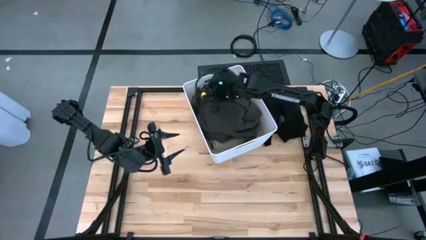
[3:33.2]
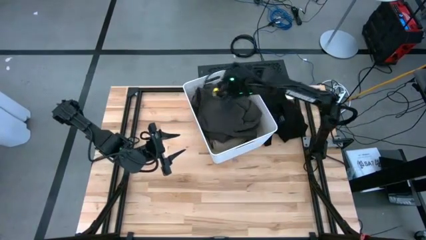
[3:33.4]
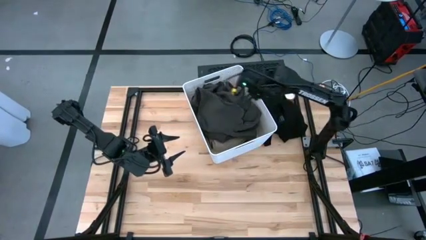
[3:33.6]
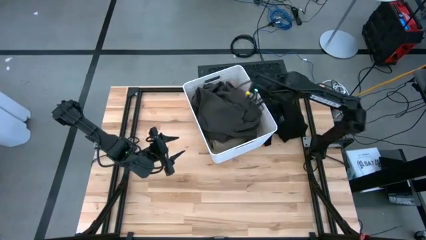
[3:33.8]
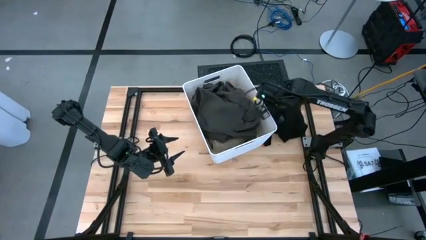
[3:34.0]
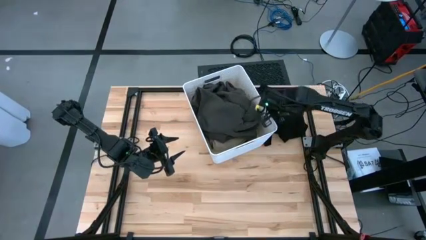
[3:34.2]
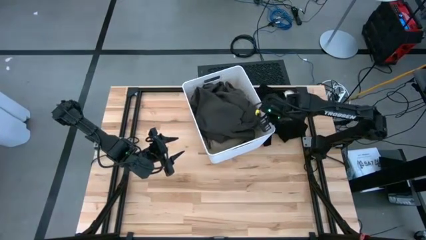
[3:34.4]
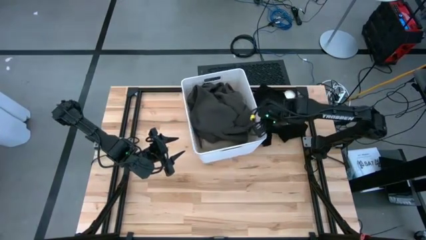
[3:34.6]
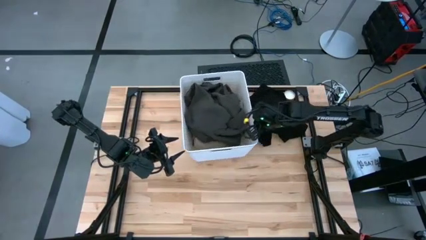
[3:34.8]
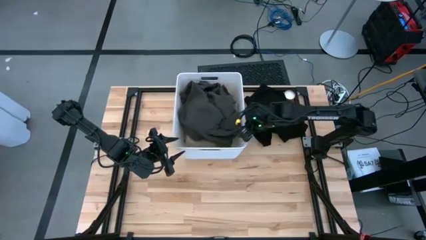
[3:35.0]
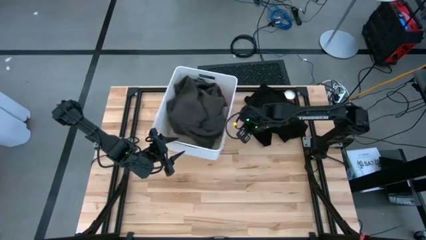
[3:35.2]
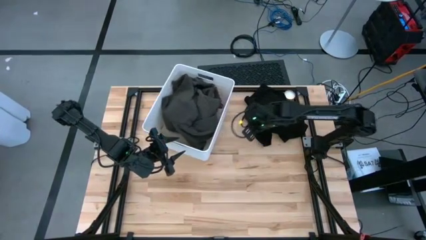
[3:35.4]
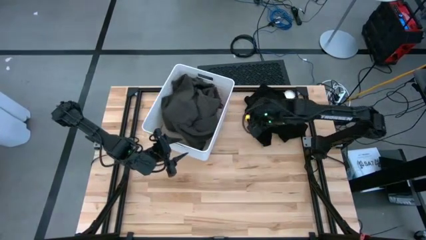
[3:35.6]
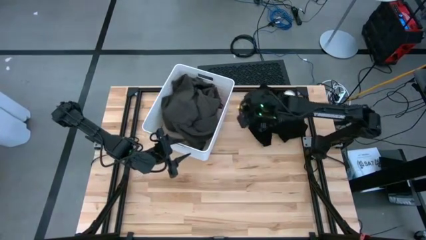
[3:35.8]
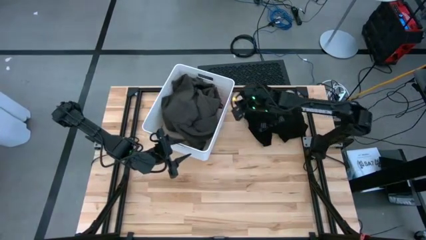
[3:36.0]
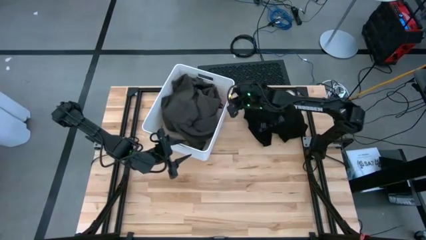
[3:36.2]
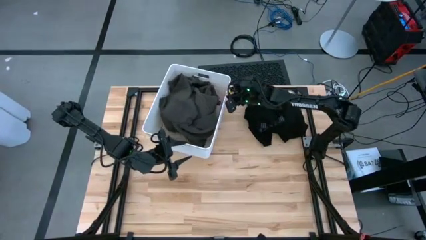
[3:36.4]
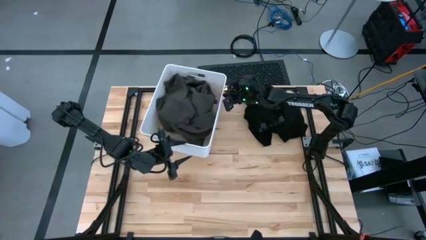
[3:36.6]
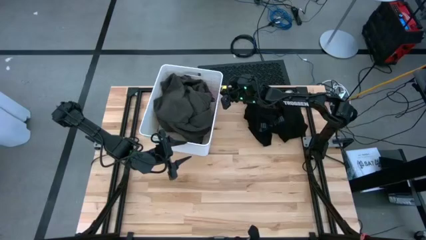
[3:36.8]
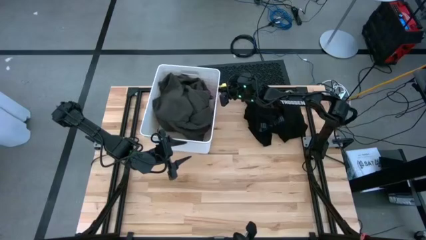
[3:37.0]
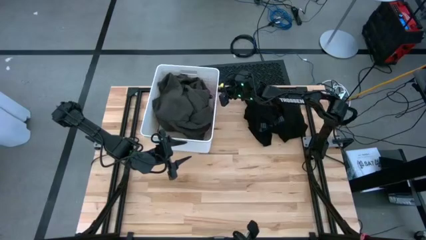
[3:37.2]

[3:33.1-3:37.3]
Task: Sort clothes
Move the white laundry bin to the top left of the table

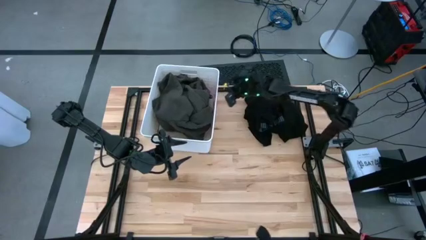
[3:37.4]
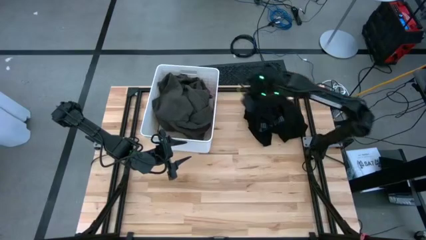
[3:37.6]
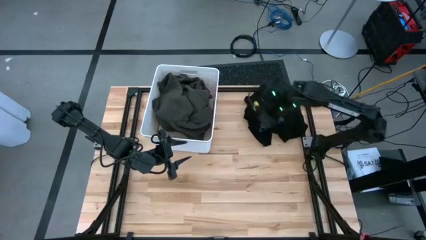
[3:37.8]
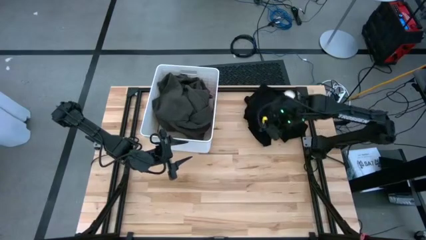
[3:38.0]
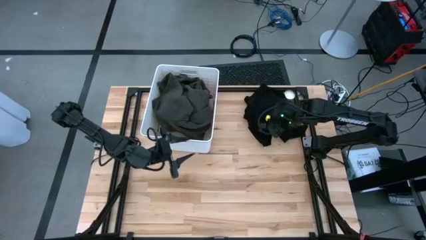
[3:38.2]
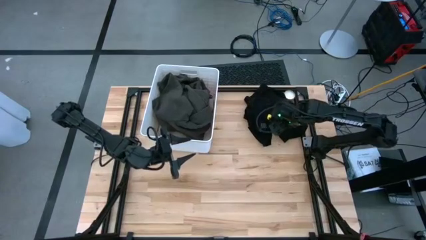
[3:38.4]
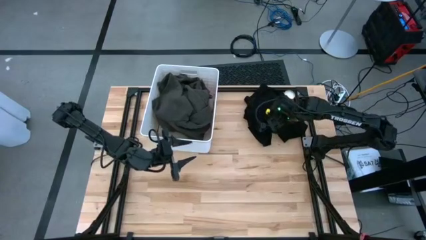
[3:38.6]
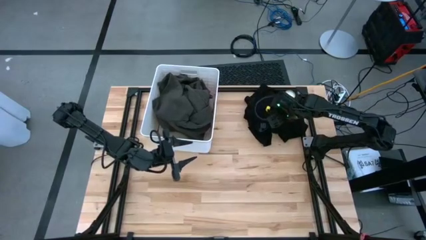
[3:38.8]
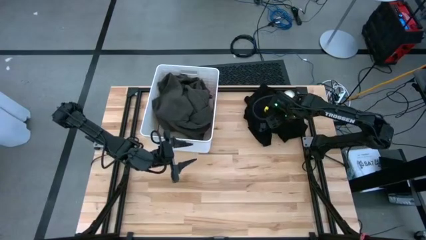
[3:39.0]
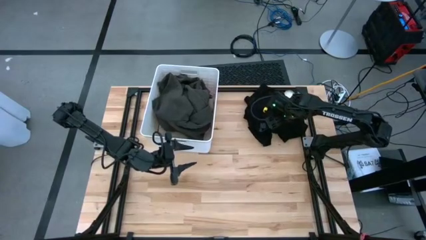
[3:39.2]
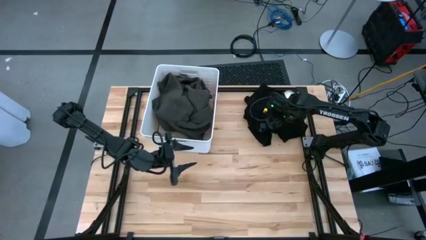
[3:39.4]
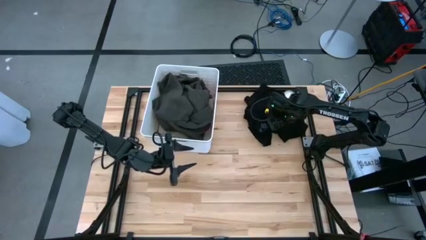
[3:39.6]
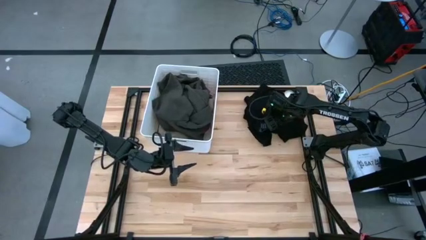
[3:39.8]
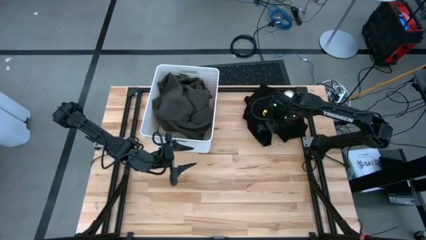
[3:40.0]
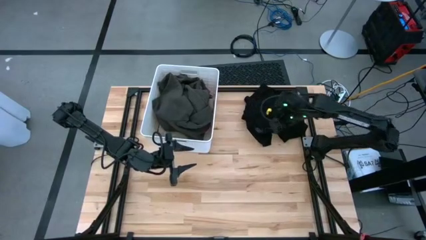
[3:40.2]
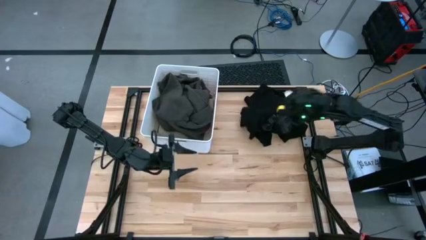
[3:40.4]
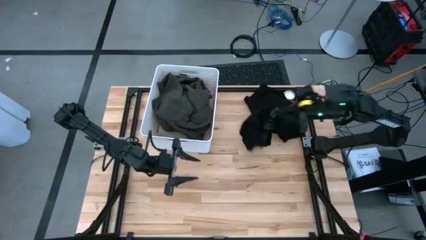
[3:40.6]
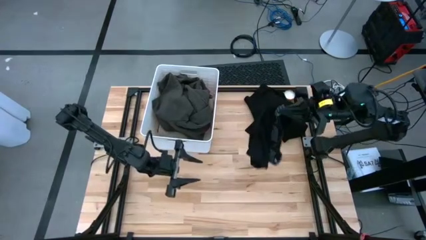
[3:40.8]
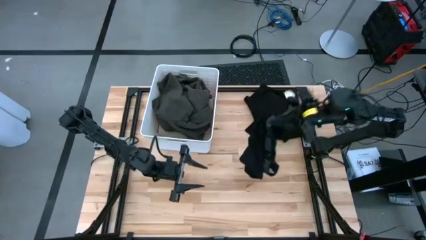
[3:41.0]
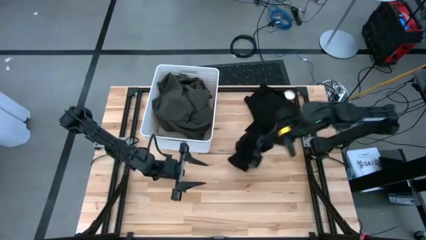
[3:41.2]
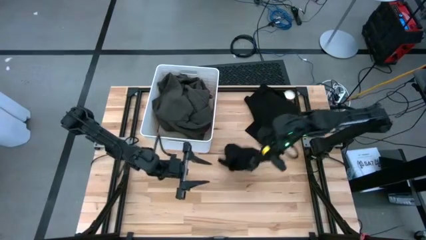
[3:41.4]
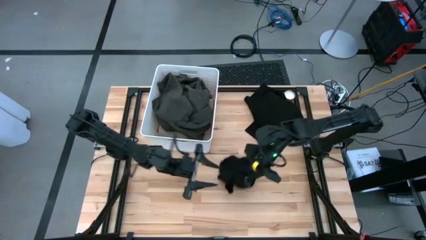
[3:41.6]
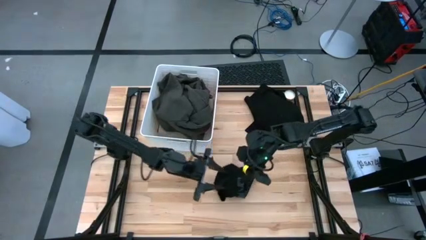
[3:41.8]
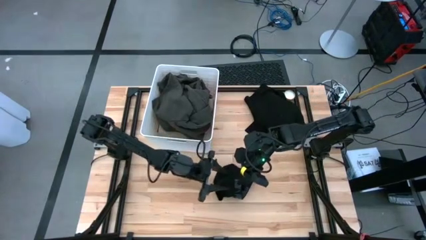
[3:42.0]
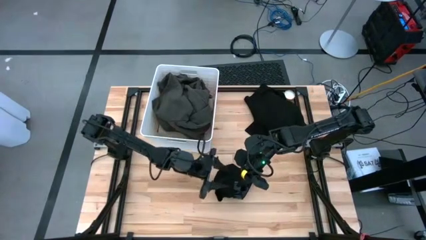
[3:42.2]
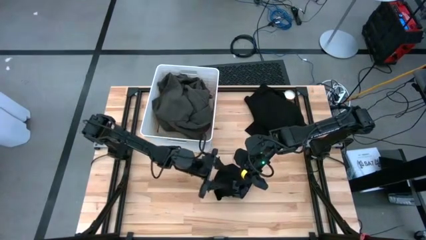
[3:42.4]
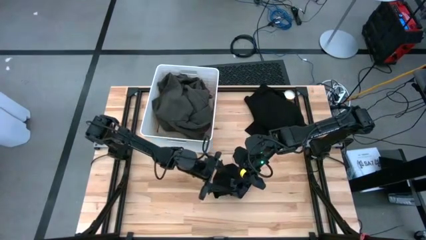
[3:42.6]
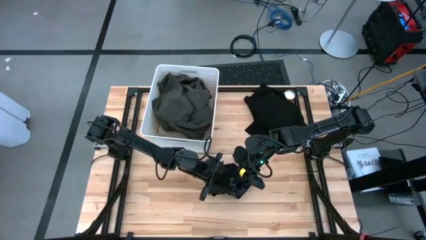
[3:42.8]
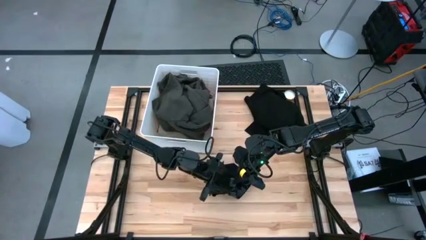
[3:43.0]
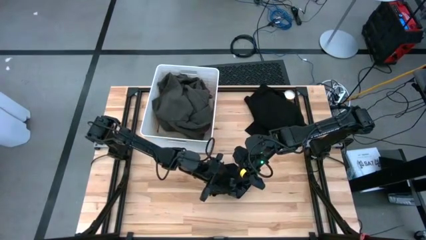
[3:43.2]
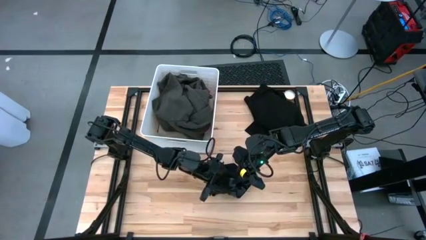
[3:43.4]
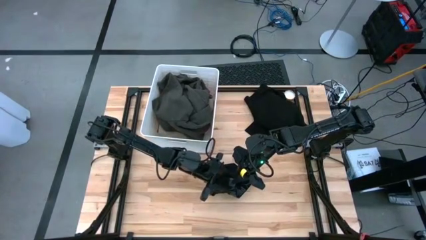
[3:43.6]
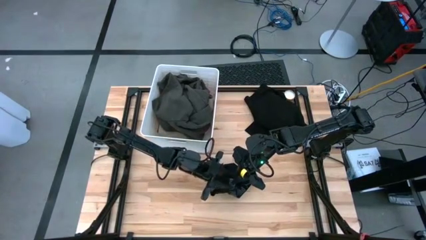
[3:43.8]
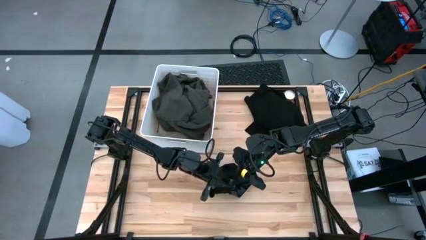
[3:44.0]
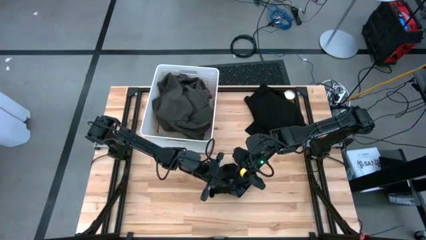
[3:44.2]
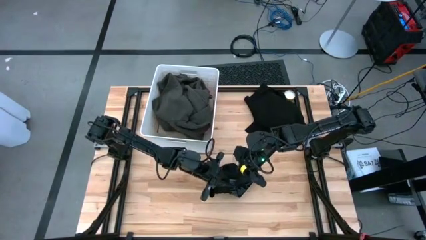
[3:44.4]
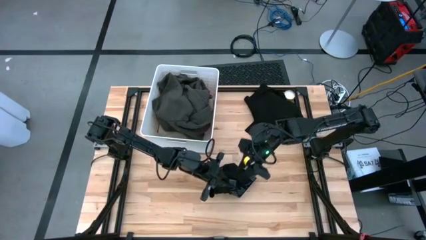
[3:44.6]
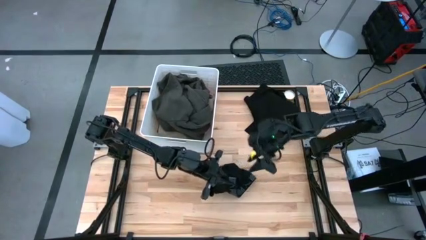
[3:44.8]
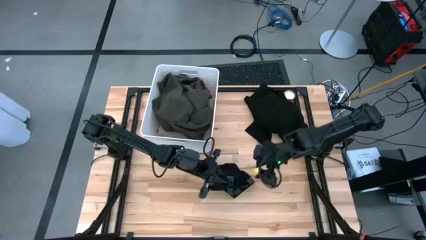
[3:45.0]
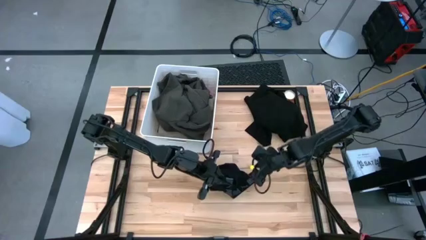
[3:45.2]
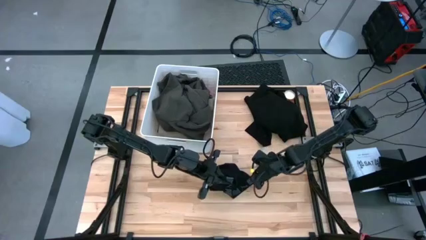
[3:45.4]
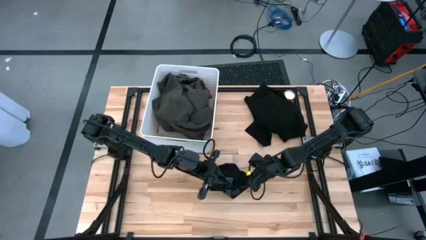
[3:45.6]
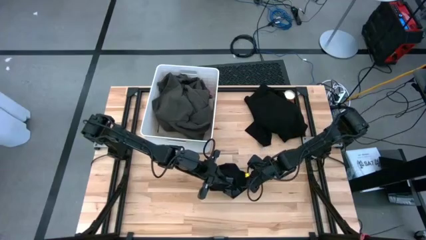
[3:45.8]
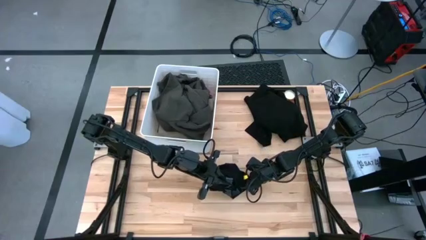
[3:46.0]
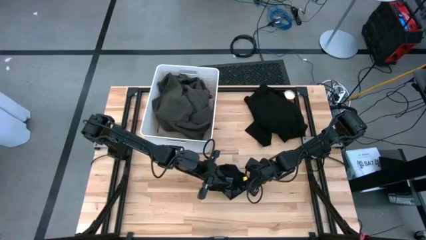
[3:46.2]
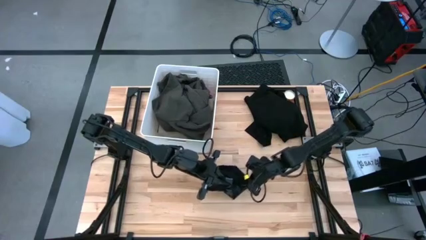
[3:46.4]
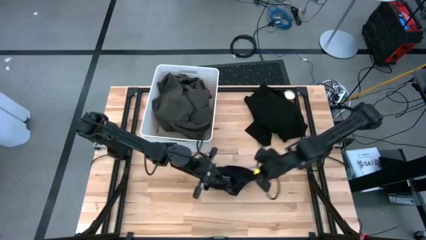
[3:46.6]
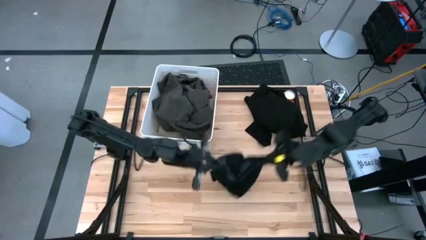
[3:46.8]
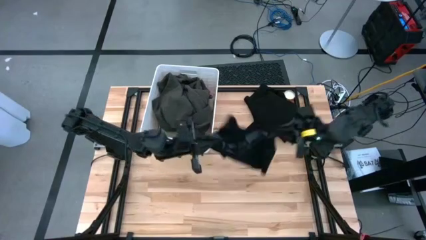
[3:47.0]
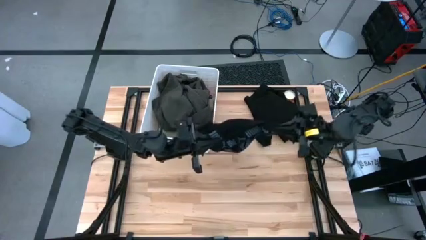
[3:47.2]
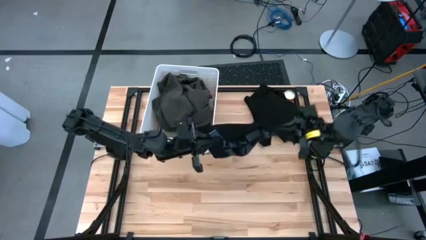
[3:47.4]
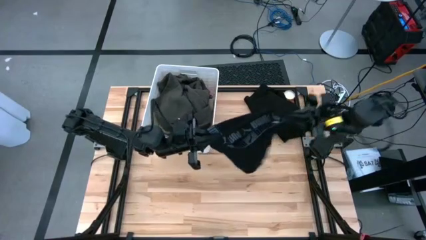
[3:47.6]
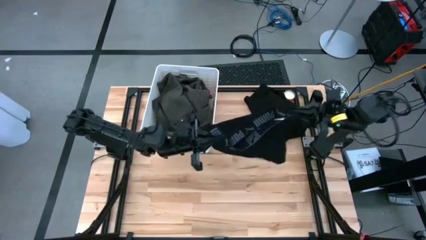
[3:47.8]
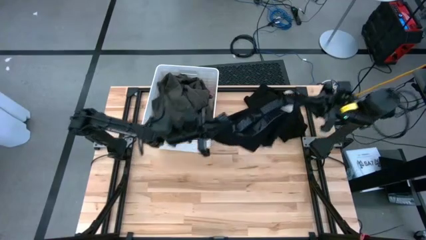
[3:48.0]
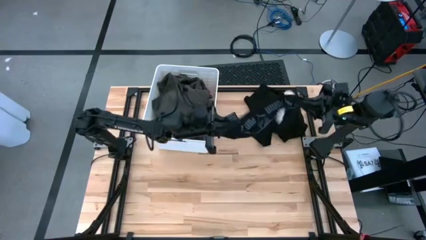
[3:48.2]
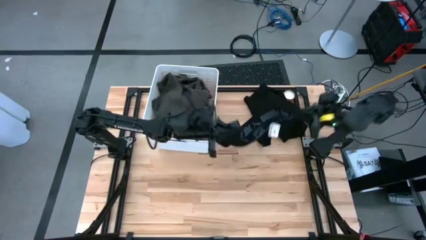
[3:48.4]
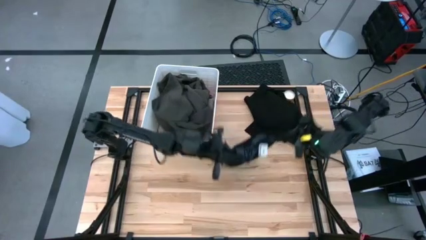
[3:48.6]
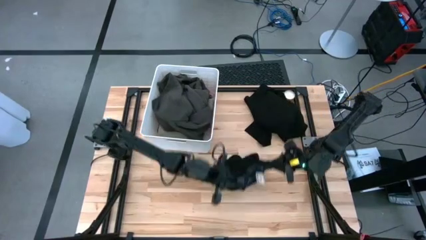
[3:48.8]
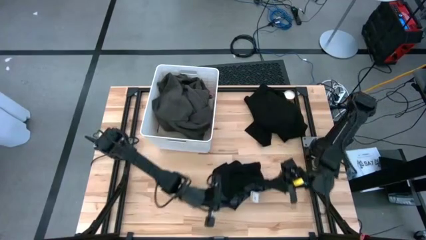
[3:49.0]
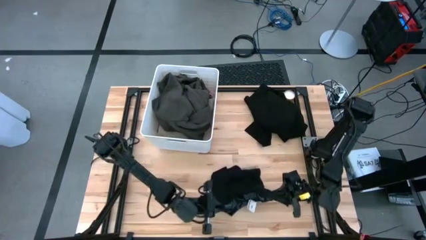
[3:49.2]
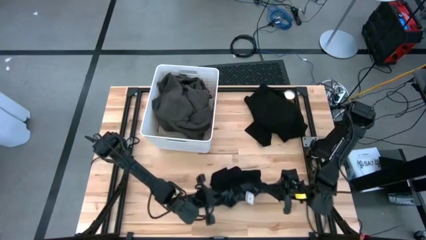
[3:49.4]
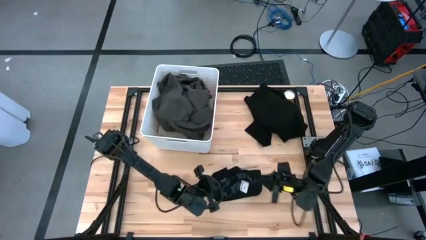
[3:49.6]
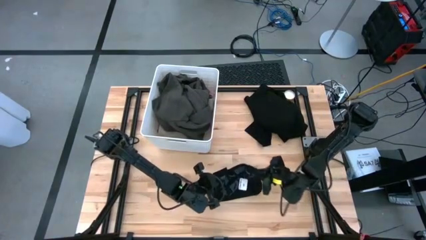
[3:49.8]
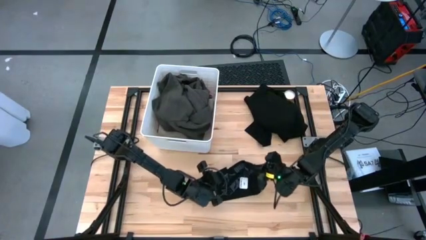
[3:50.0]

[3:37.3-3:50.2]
Put the black boxer into the white laundry bin
